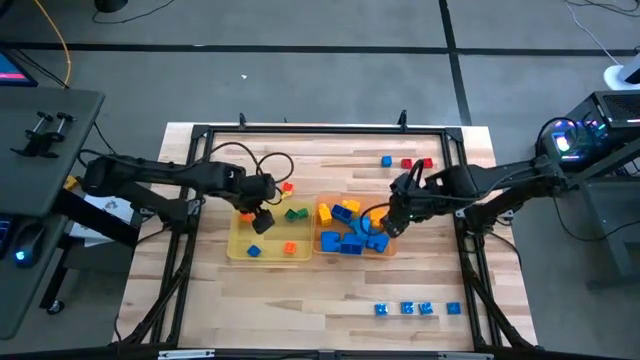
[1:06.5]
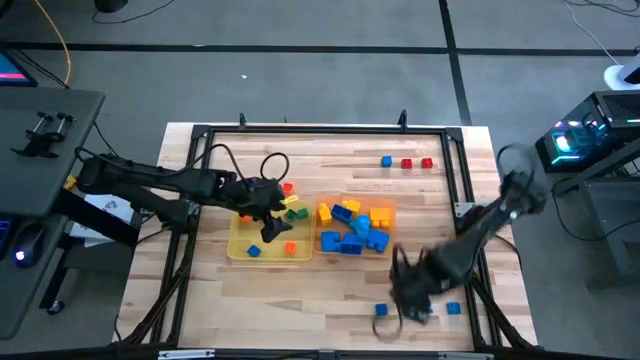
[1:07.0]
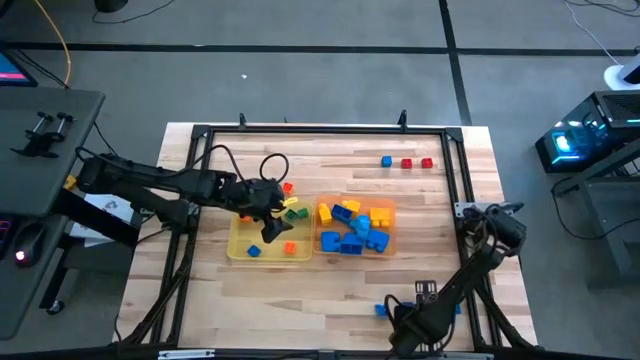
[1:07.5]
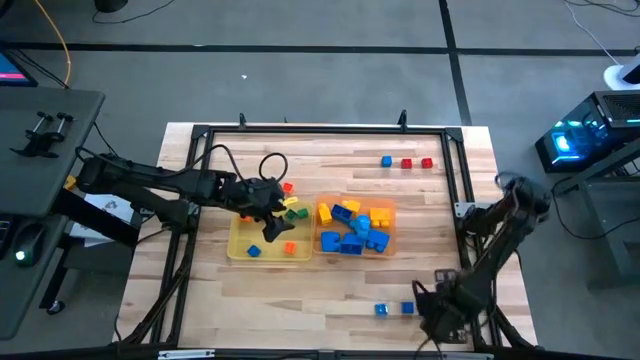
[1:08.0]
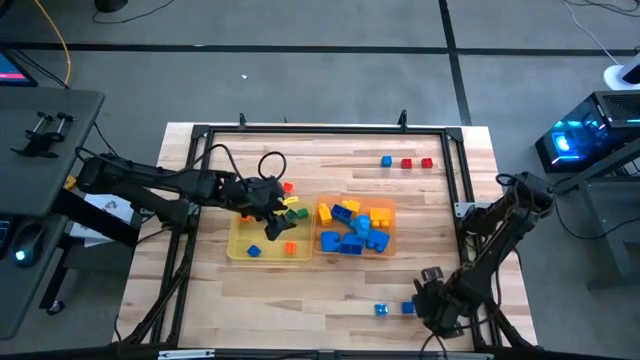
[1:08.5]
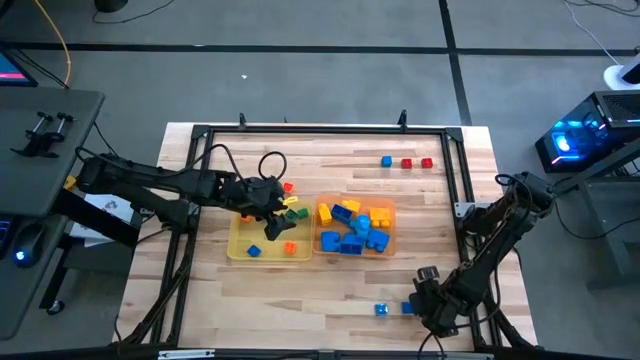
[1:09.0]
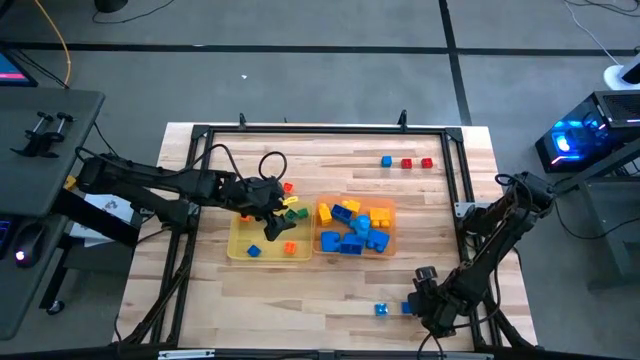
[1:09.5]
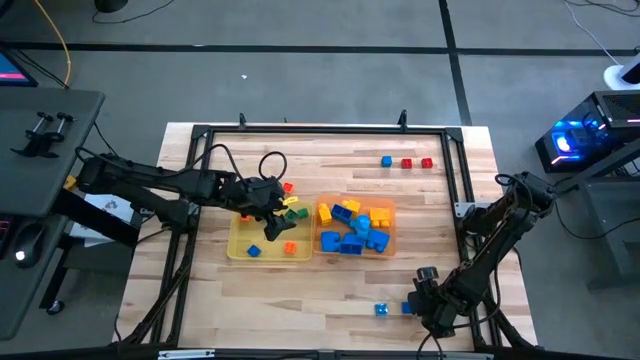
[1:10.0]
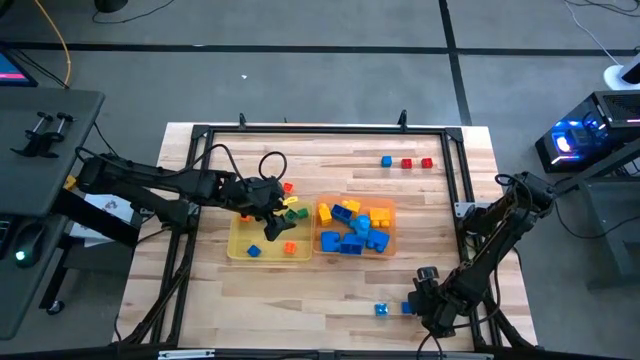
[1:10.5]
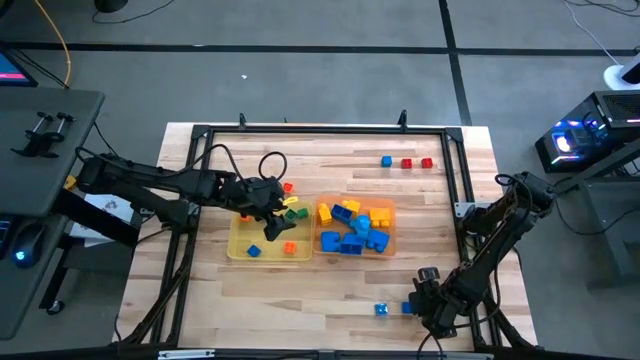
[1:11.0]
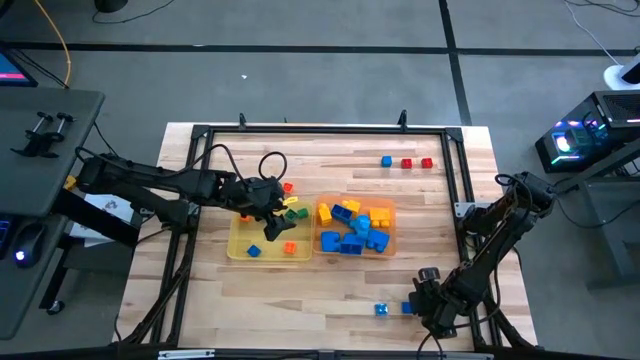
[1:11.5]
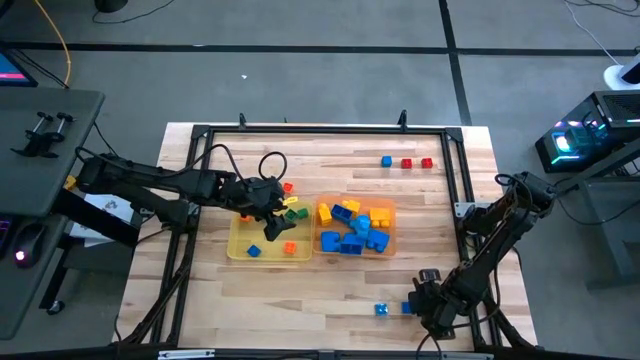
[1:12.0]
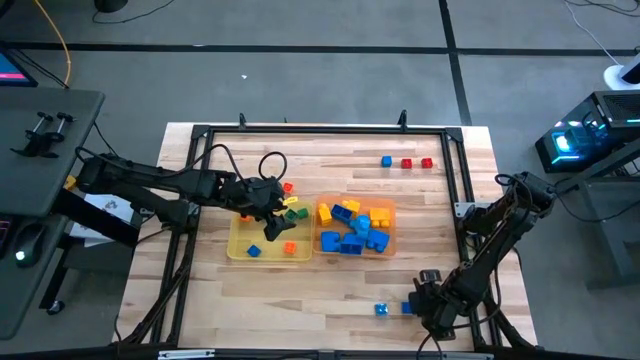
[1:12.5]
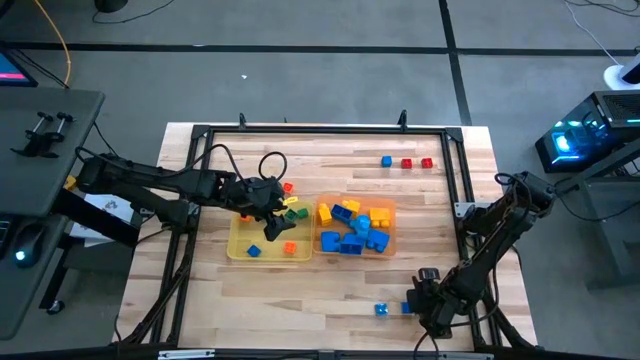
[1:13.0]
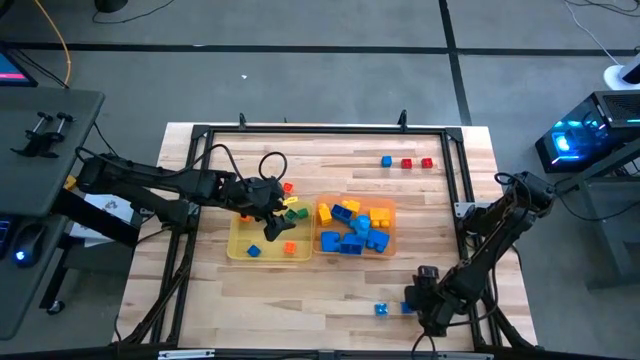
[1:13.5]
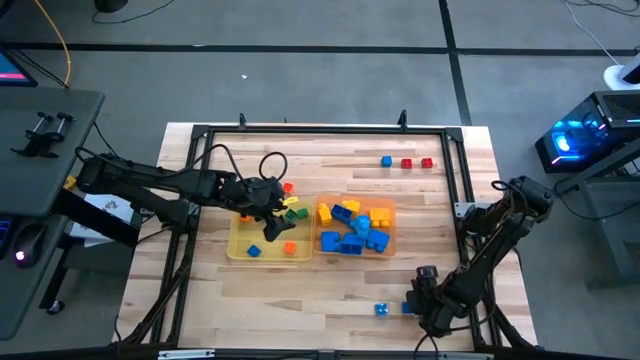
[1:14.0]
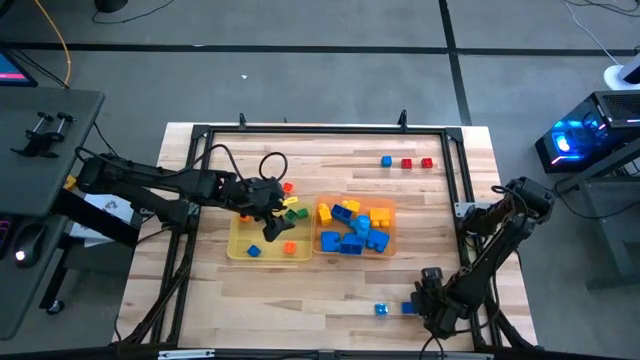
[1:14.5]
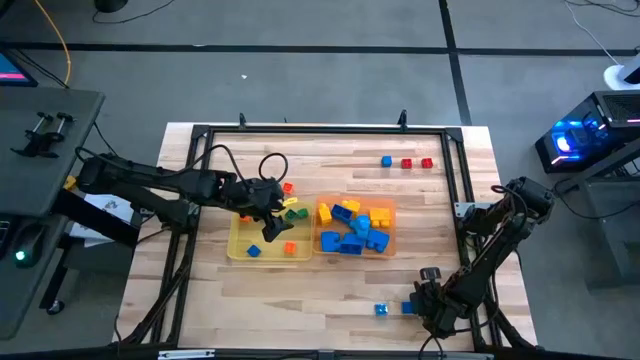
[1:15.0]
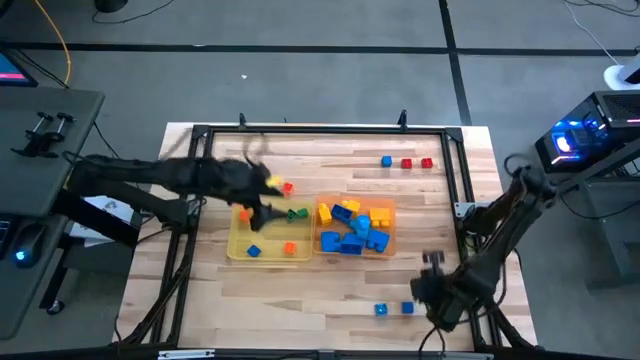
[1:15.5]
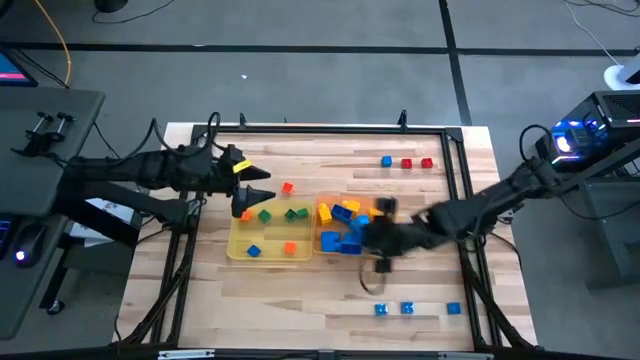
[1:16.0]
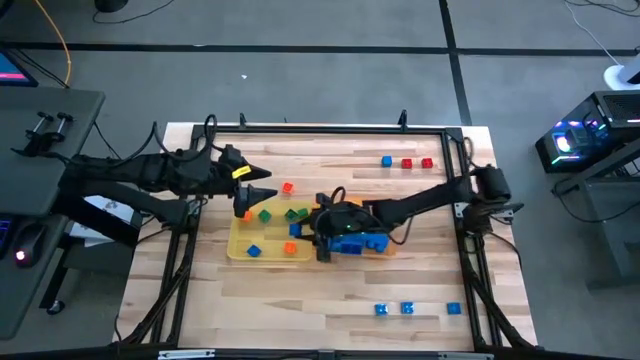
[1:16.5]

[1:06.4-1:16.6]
Task: Sort blocks by size
Put the small blue game piece into the yellow bin

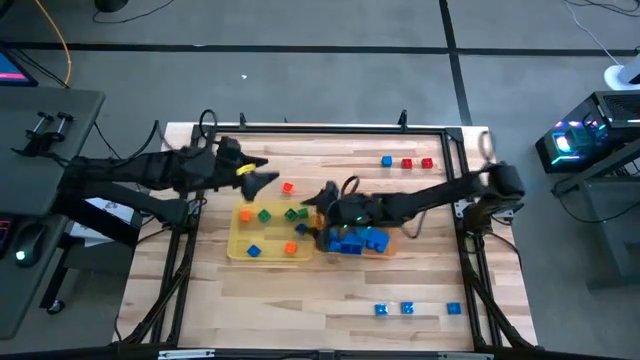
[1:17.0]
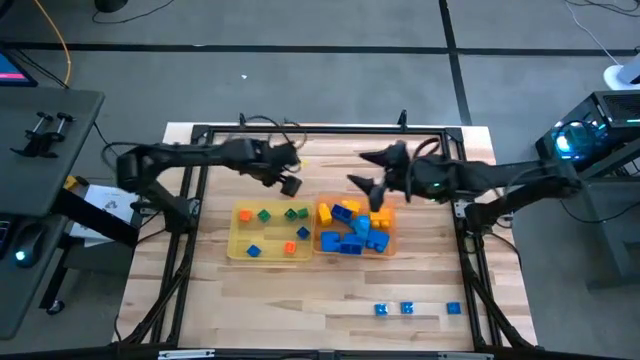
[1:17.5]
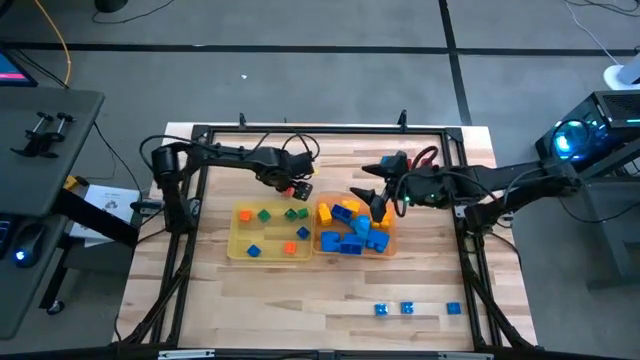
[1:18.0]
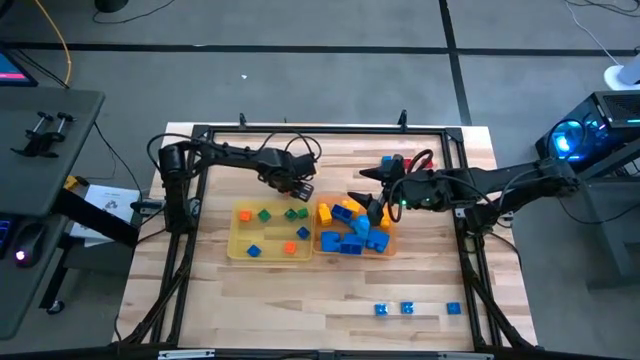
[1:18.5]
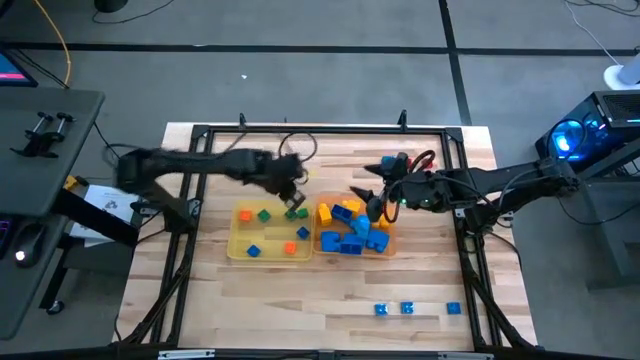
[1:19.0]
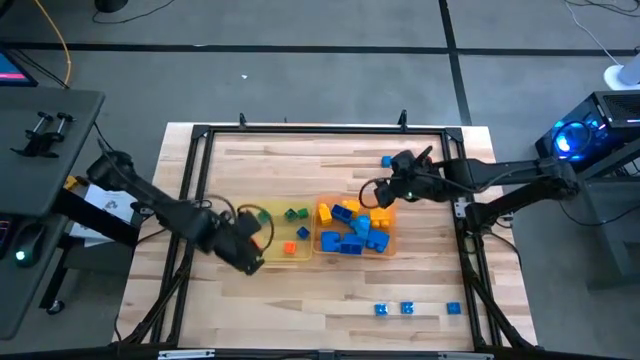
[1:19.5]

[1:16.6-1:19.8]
Put the small orange game piece into the yellow bin

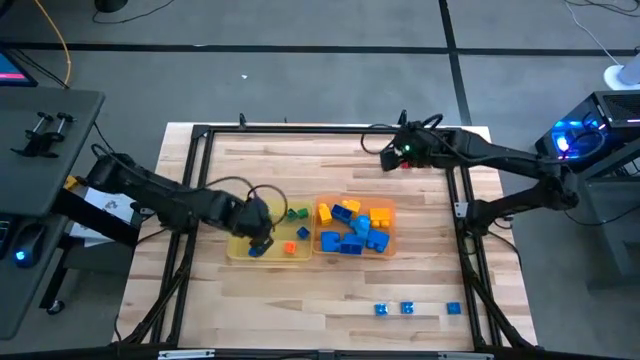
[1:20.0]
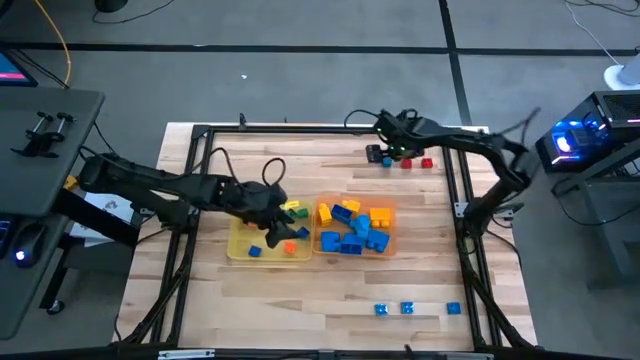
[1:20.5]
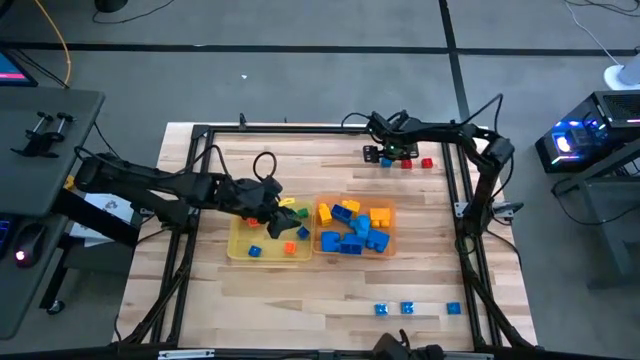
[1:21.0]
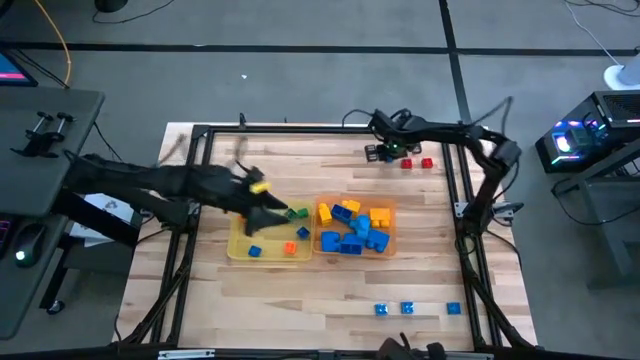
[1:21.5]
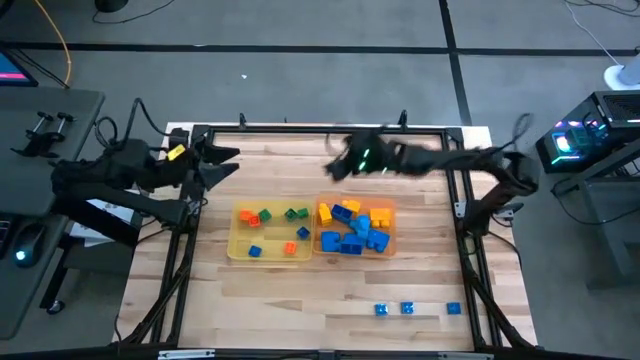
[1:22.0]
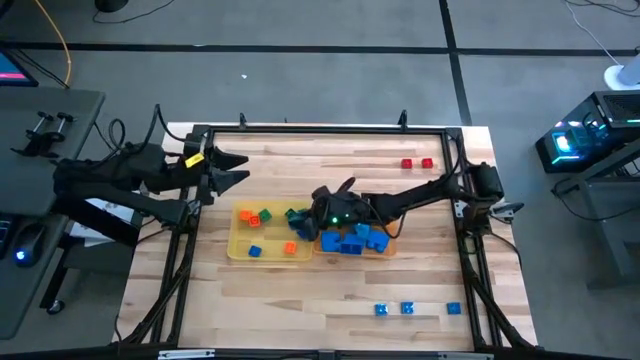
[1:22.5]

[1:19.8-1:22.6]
Put the small blue game piece into the yellow bin

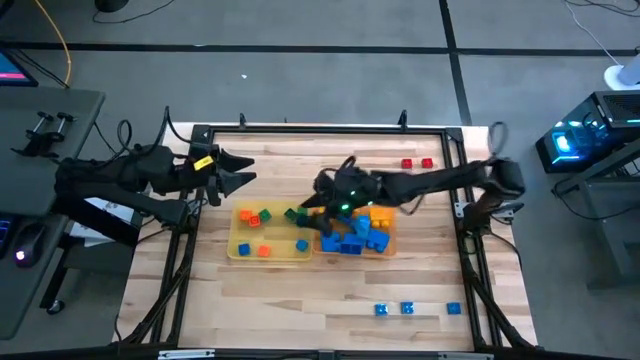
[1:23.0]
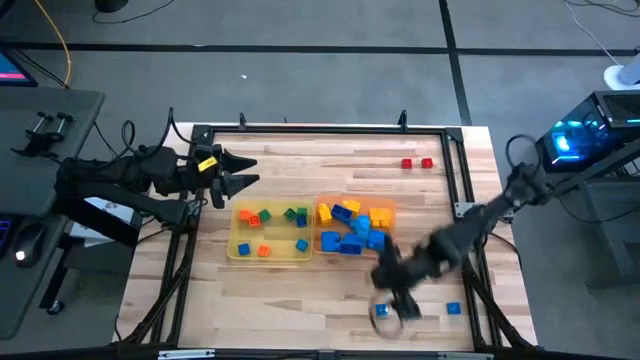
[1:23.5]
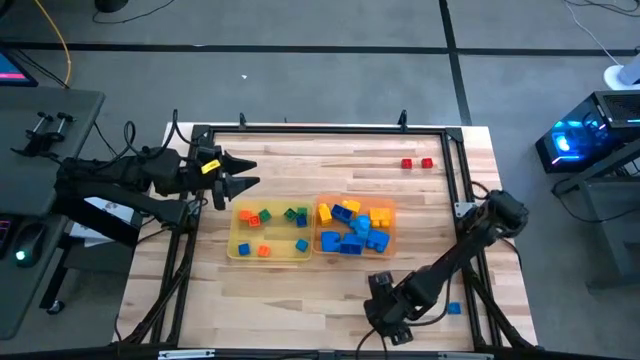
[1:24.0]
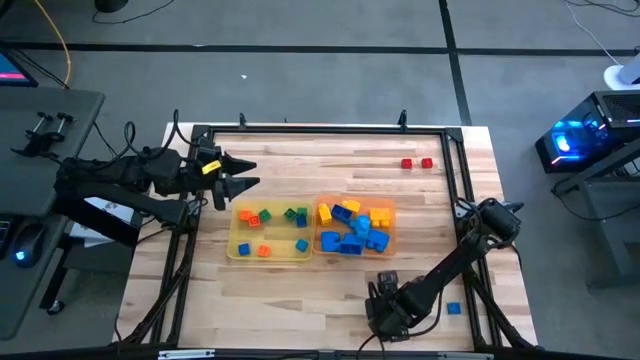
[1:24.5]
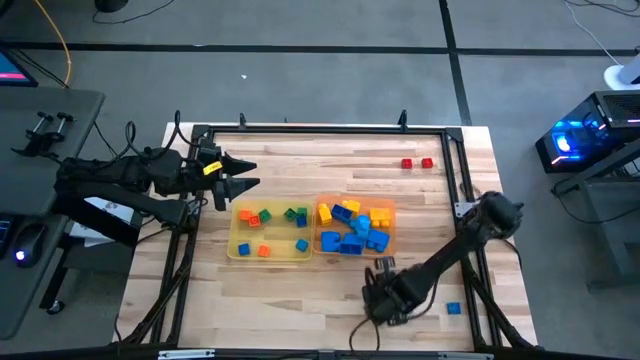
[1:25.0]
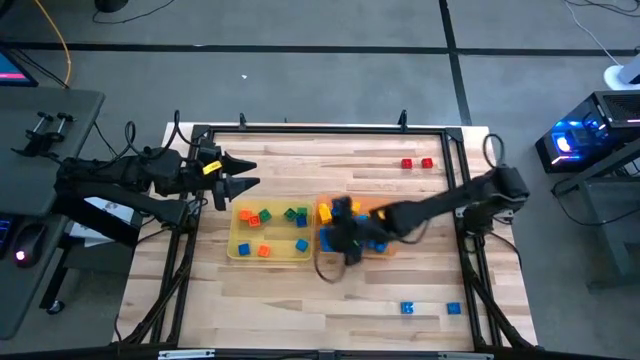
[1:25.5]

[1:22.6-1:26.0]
Put the small blue game piece into the yellow bin

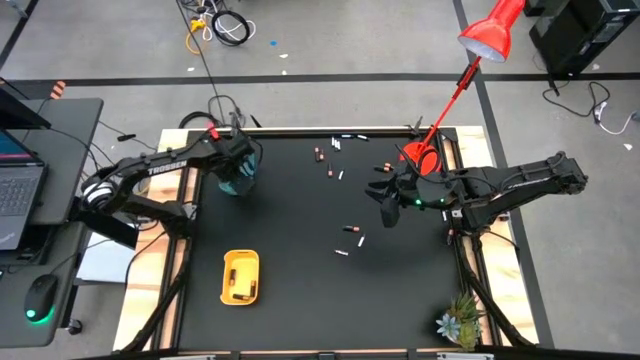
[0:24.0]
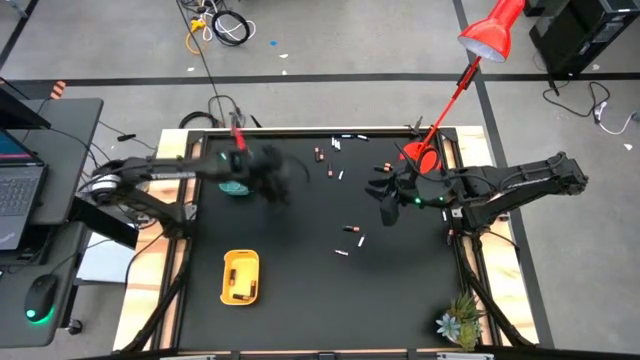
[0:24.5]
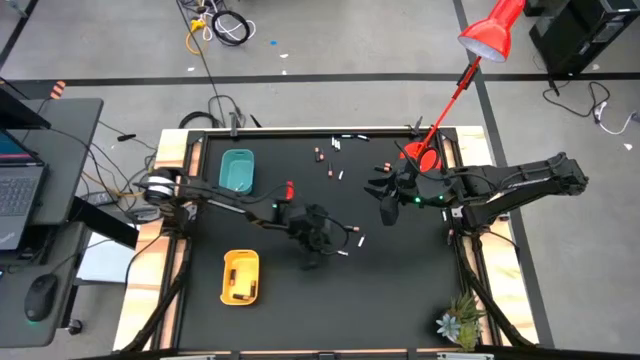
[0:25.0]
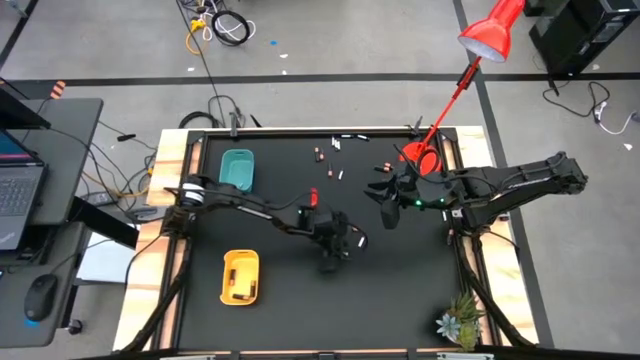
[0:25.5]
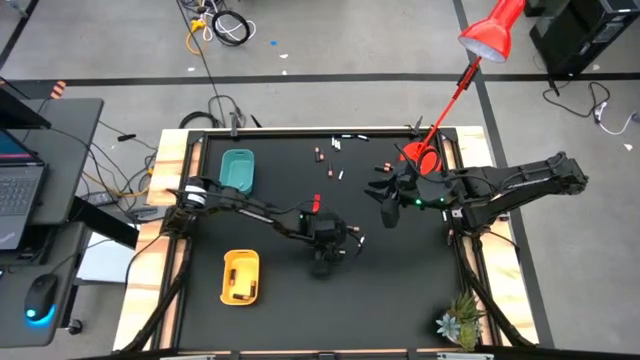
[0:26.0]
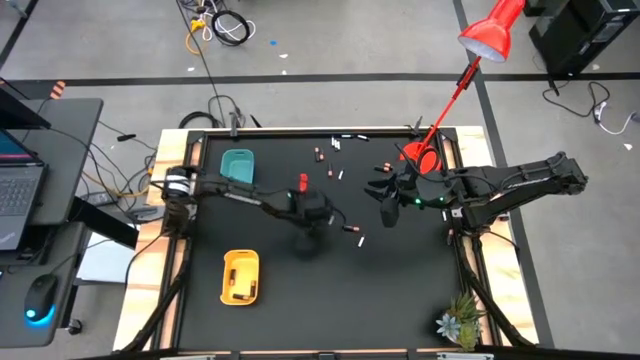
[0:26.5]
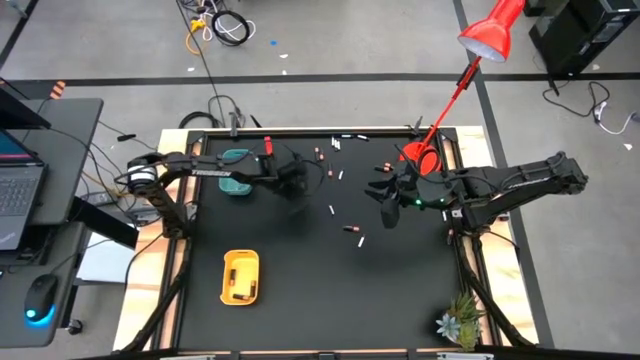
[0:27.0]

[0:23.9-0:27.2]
Task: Sort batteries
Put the white battery into the blue bin
